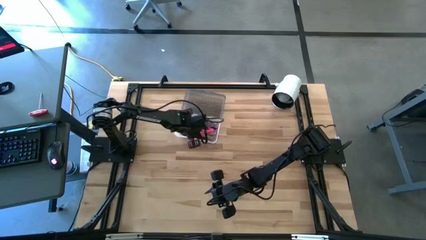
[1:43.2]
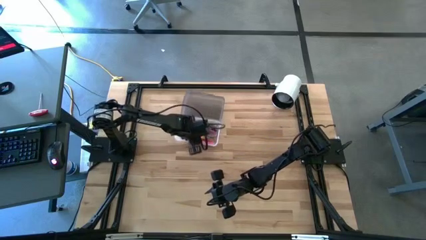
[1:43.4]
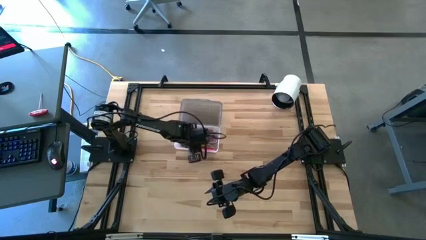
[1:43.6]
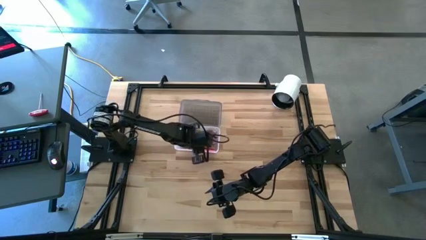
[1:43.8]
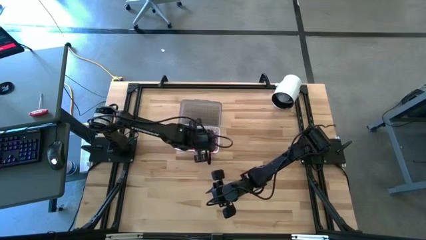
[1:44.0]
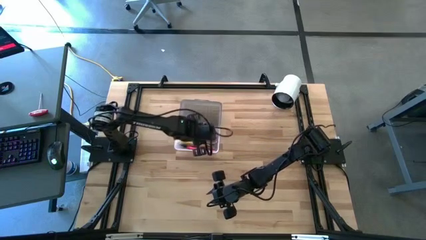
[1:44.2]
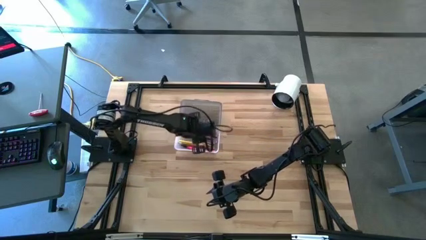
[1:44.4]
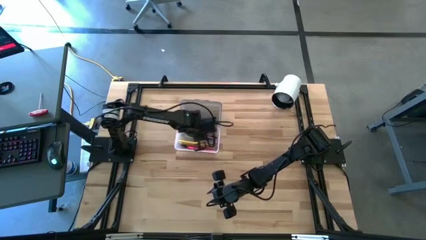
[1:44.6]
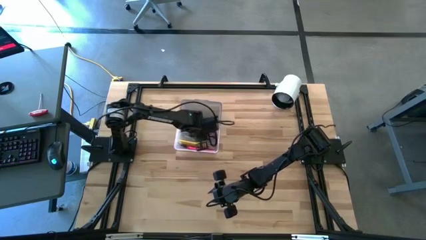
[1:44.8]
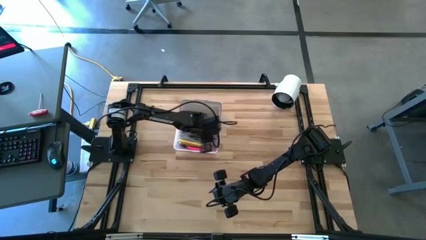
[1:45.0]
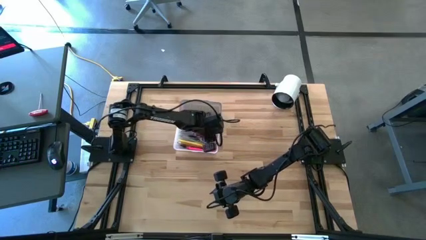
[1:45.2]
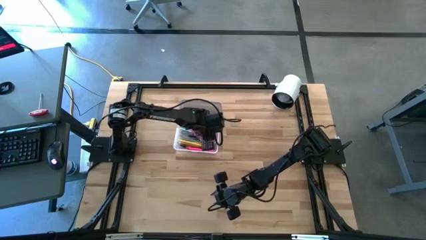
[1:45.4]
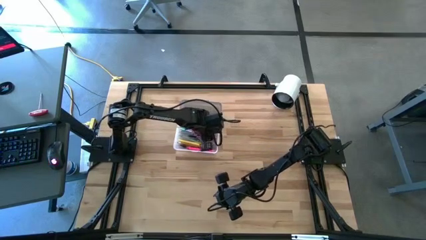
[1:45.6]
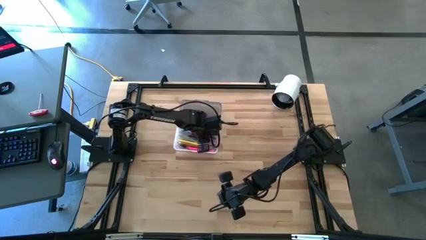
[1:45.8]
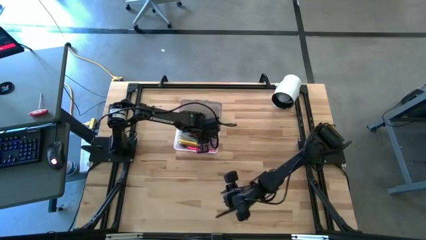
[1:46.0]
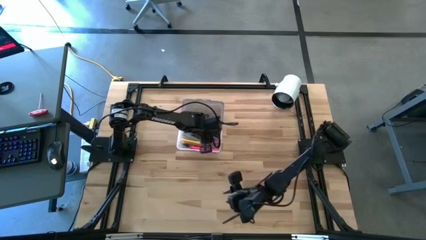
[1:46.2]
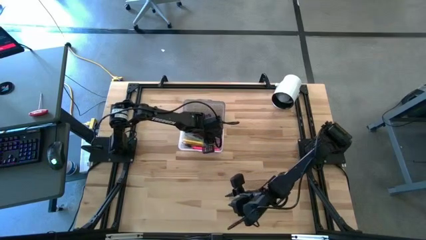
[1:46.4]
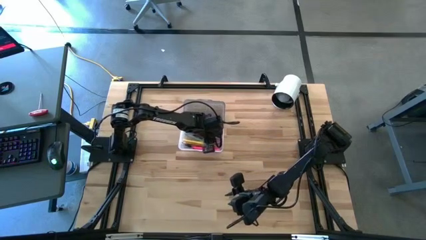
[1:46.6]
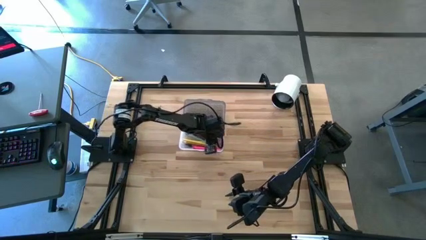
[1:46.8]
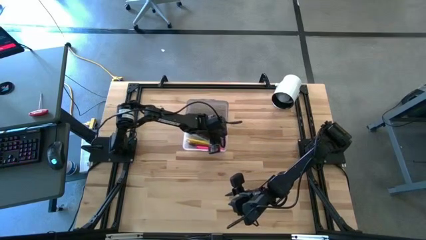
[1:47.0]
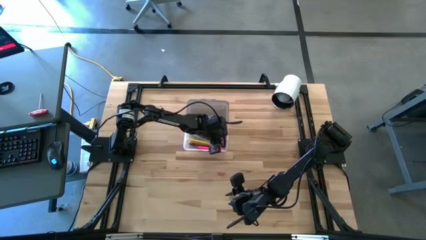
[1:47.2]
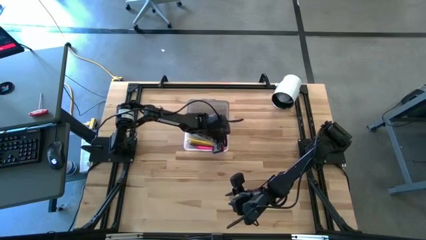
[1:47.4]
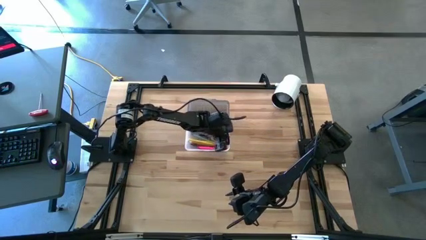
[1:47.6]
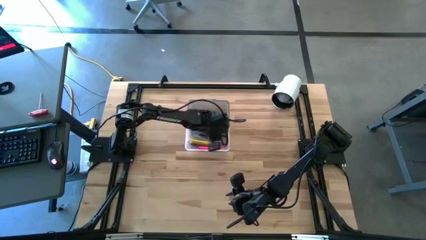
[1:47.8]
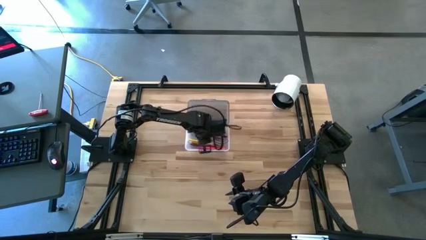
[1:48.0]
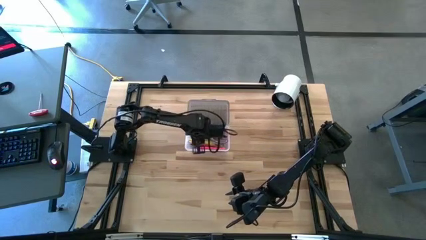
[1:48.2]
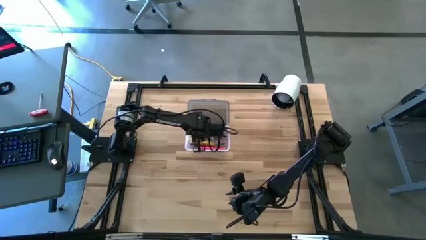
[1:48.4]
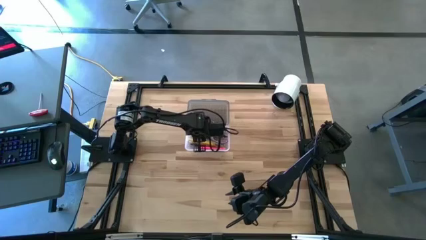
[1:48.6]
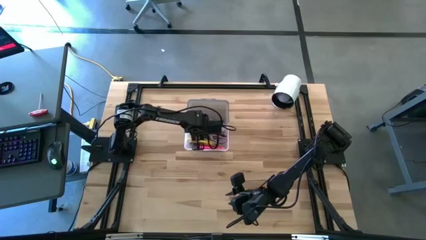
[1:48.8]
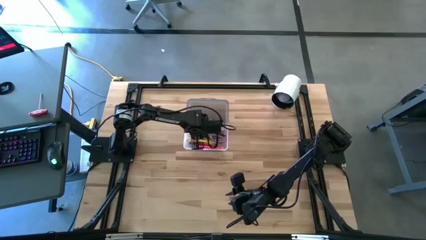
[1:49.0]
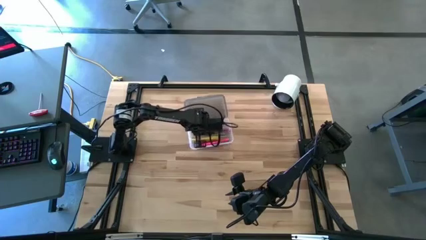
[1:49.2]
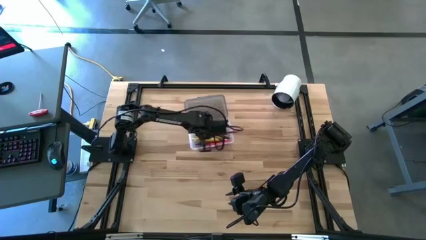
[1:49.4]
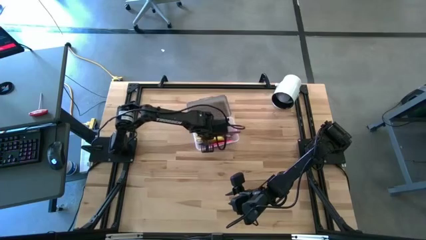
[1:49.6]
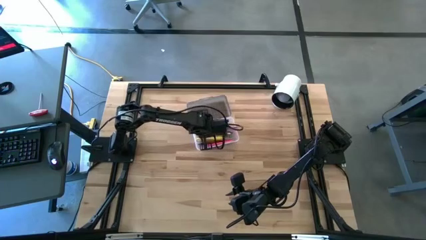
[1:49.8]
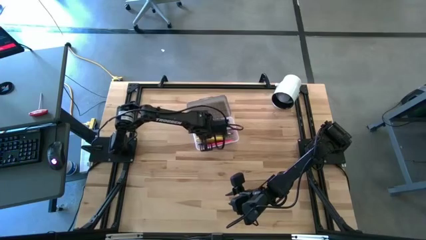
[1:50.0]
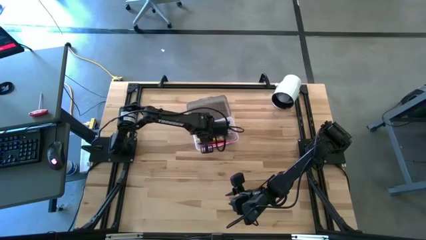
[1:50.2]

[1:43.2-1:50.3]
Task: Pick & place school supplies into a supply box
Adjust the purple scissors in the black supply box

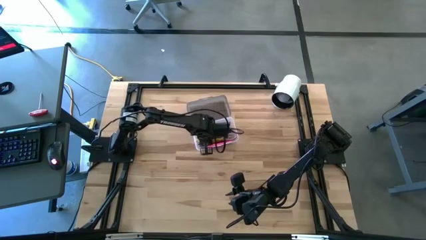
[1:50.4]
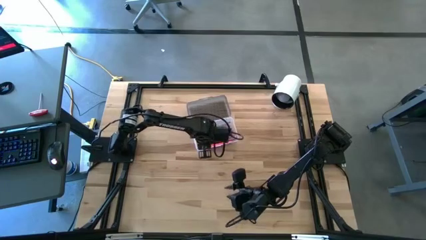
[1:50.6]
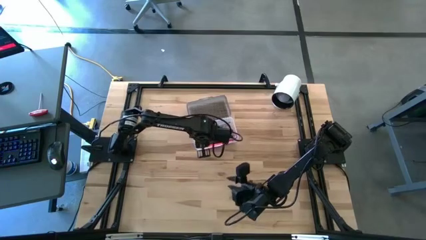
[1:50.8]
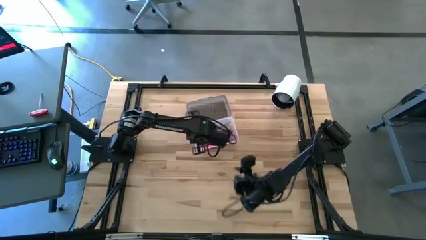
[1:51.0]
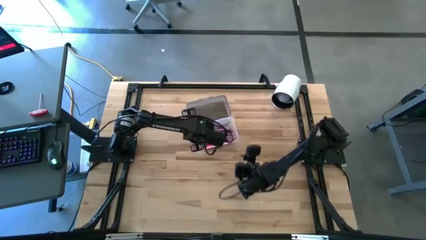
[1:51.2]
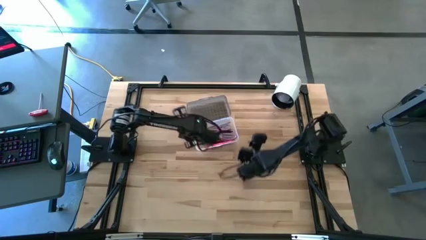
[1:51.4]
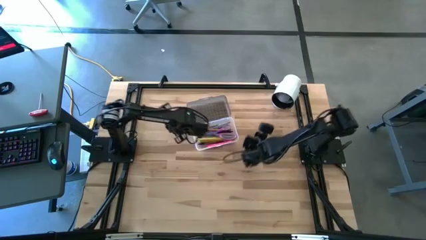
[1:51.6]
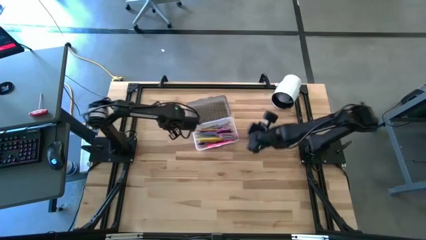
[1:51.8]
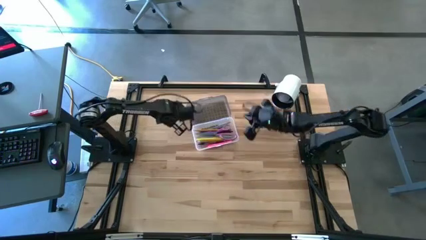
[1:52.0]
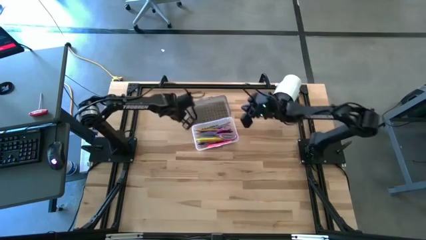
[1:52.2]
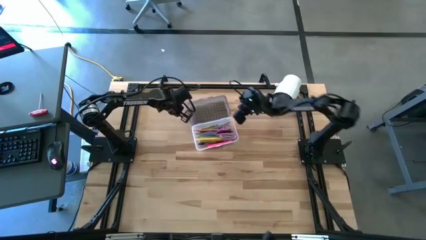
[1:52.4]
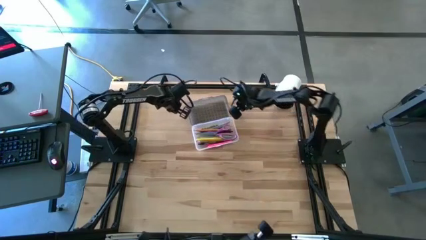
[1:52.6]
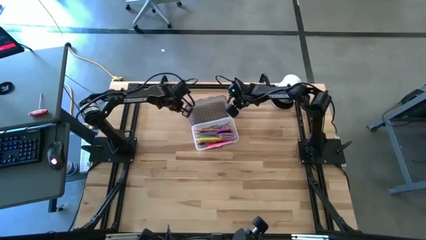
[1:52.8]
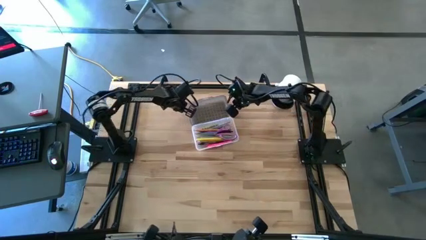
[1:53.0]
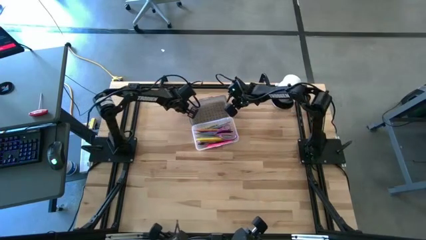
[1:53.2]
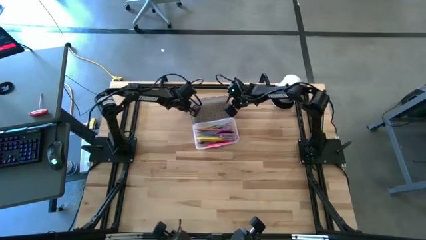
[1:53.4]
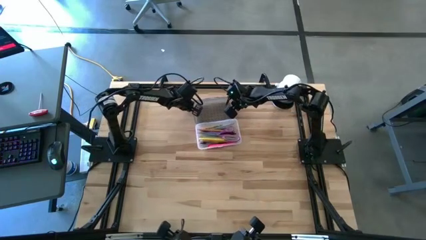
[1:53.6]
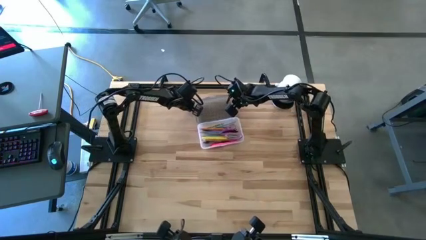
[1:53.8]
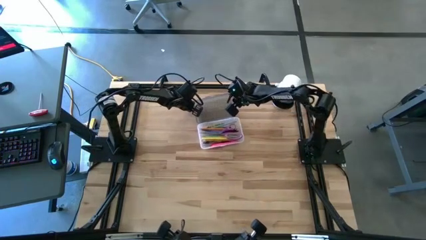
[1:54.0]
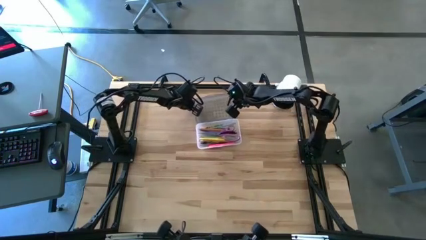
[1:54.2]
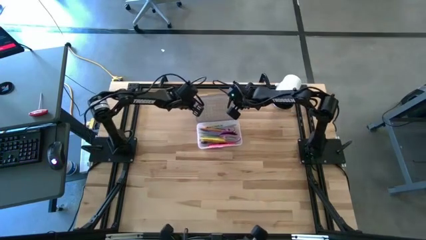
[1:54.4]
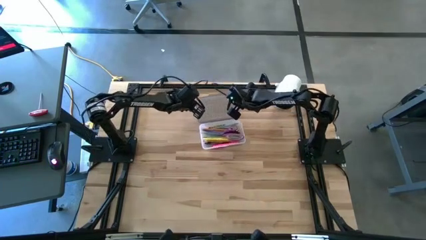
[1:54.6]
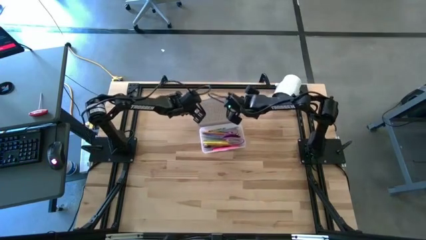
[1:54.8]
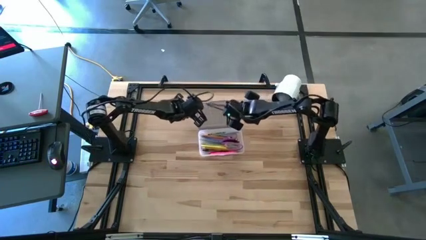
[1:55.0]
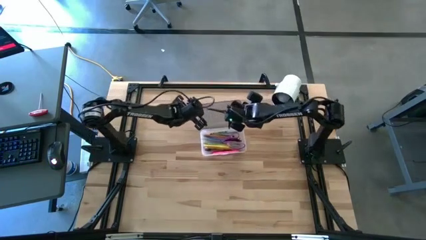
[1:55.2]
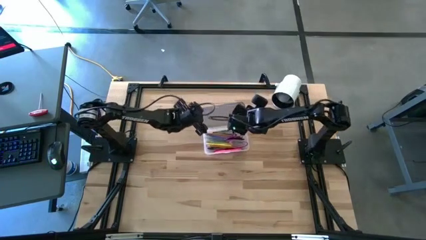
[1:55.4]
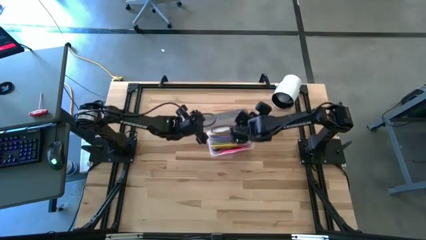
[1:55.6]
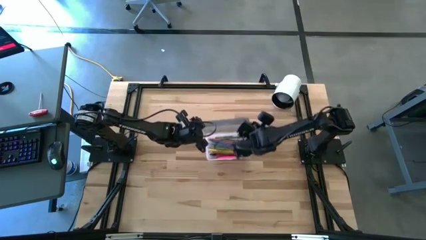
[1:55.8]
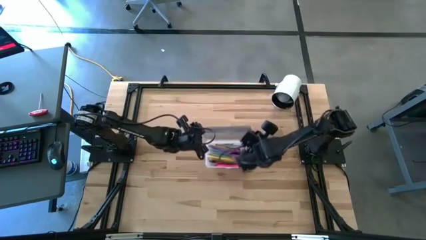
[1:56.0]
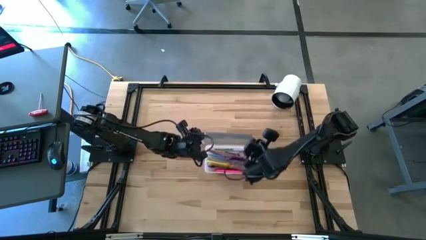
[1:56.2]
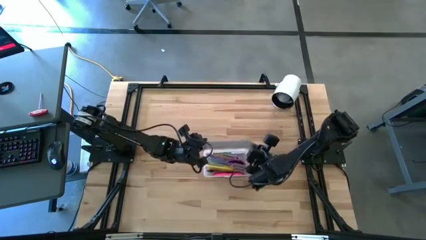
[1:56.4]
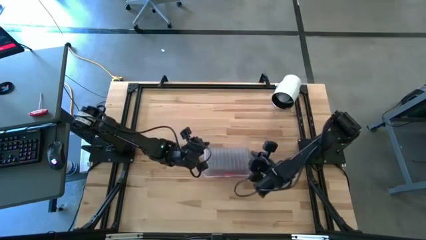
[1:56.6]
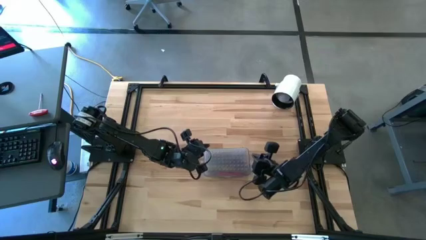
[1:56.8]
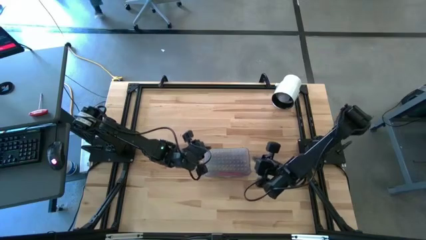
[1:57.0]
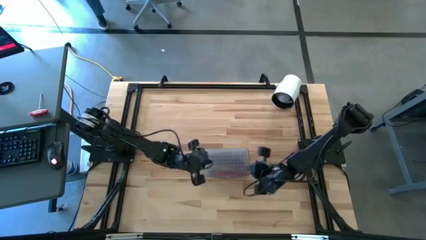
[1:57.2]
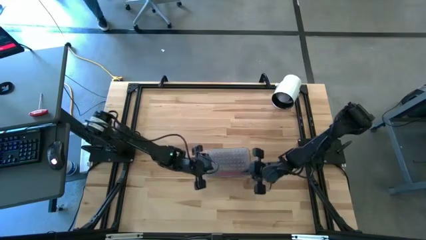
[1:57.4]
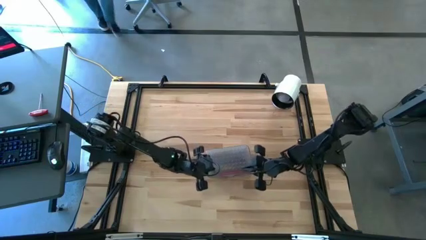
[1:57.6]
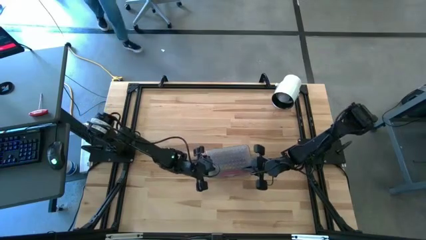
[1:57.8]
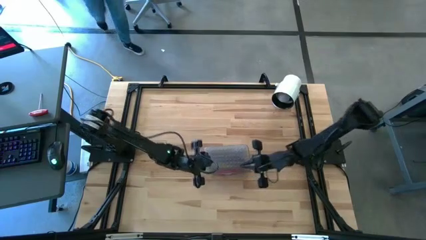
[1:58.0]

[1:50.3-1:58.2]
Close the black supply box

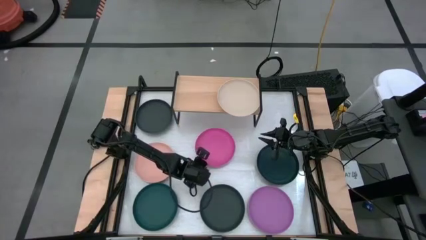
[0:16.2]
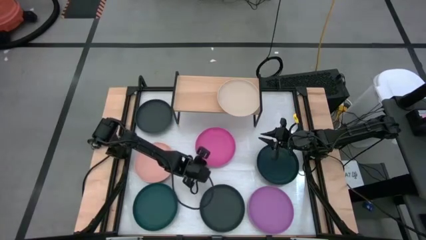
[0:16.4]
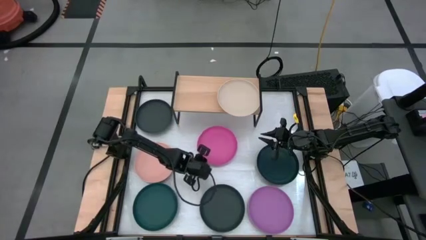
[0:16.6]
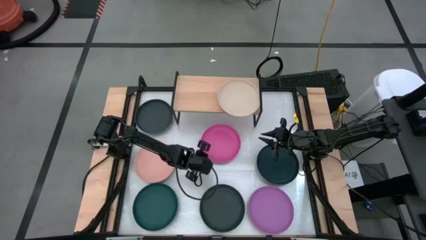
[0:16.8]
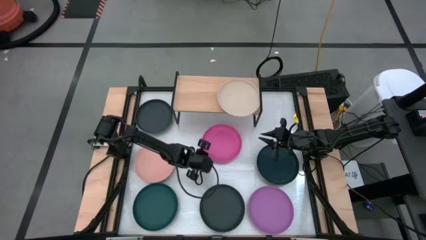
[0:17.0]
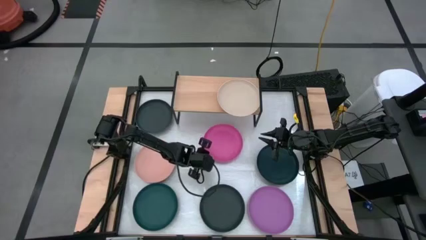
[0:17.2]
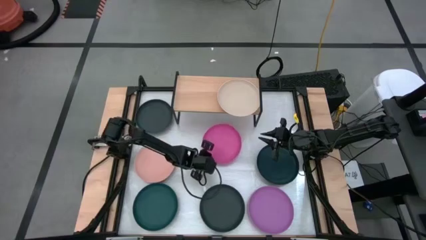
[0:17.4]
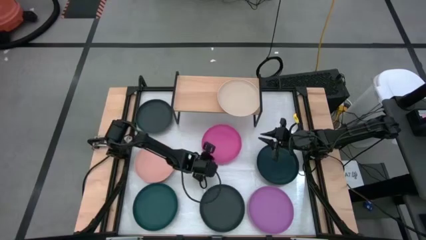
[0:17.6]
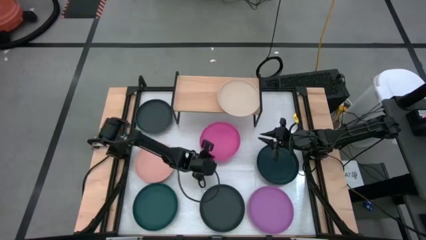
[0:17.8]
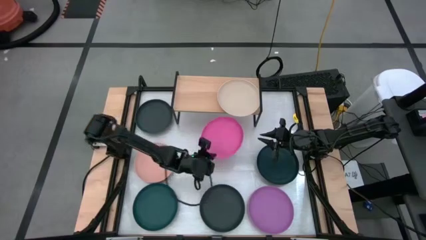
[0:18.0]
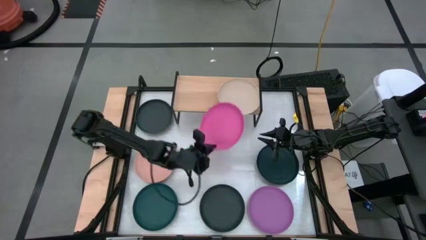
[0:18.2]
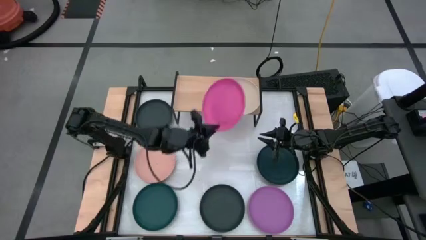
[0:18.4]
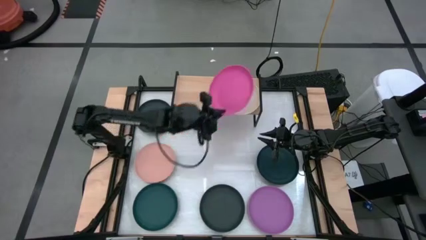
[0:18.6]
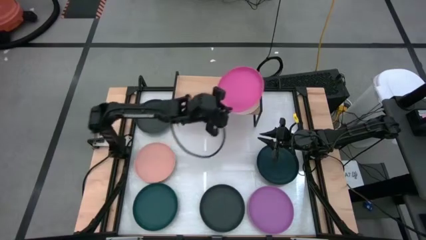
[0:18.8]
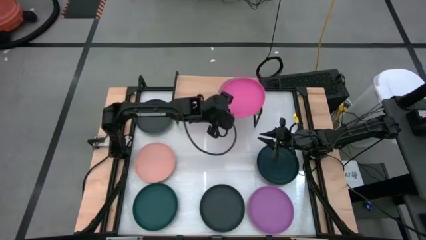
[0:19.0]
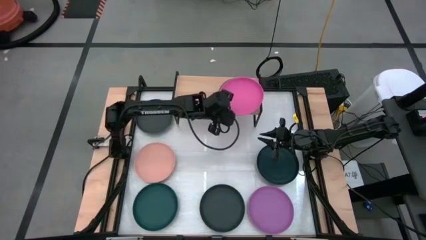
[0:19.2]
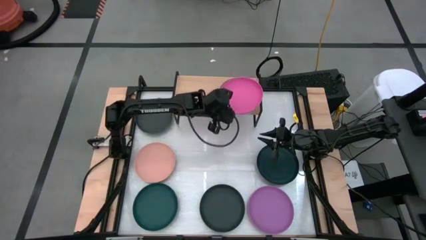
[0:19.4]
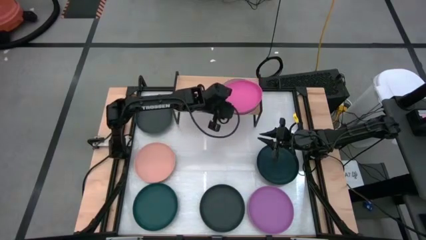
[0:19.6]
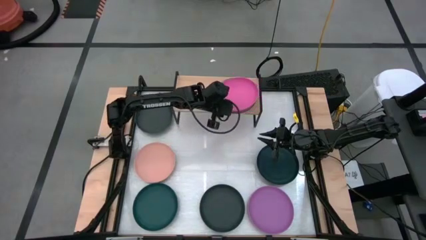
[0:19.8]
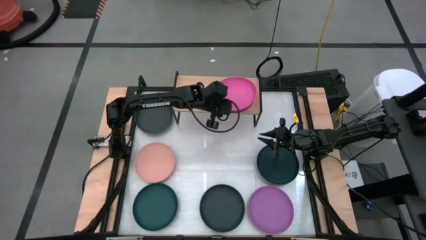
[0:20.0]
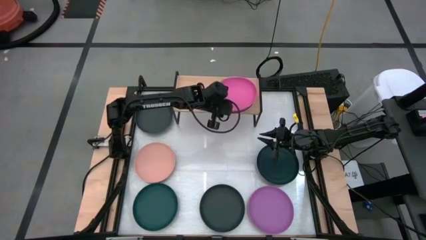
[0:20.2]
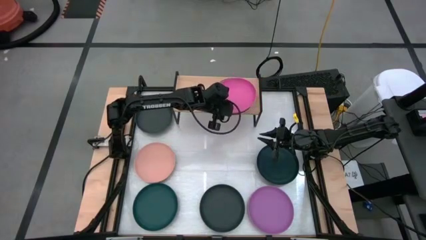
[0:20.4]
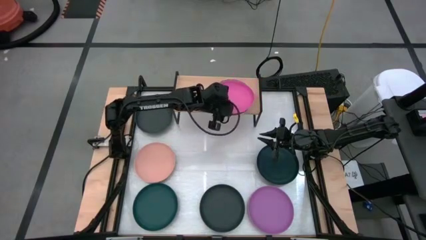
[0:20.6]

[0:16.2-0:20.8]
Task: Place and stack plates onto a shelf
Stack the pink plate on top of the light brown plate on the shelf
